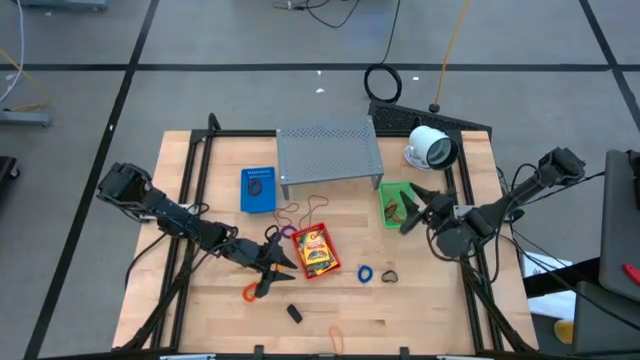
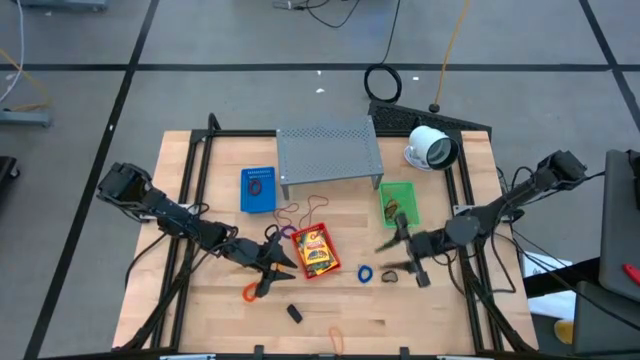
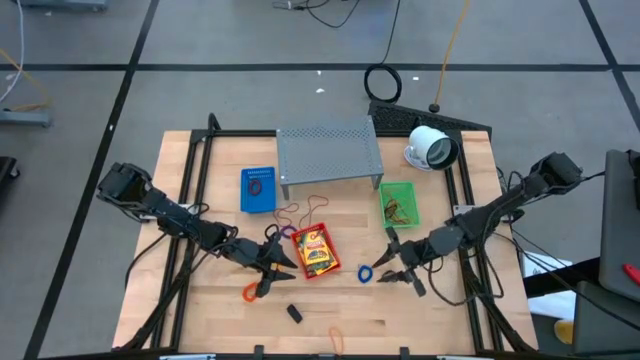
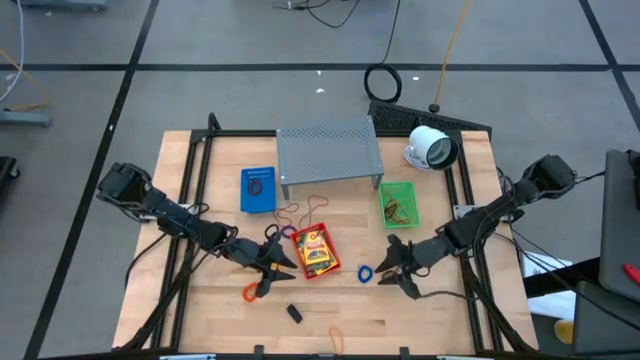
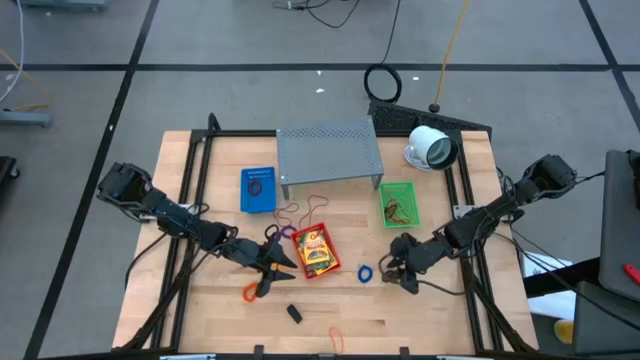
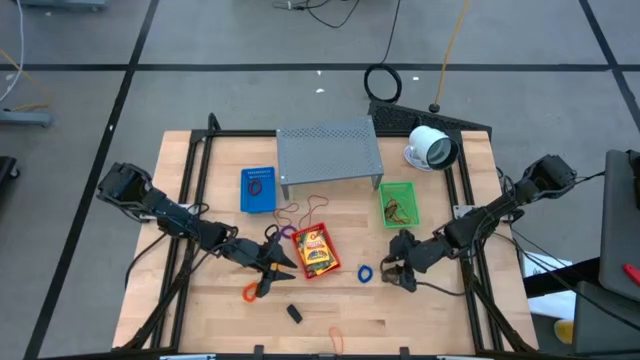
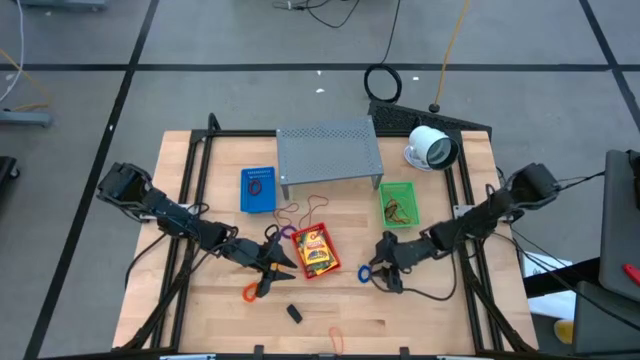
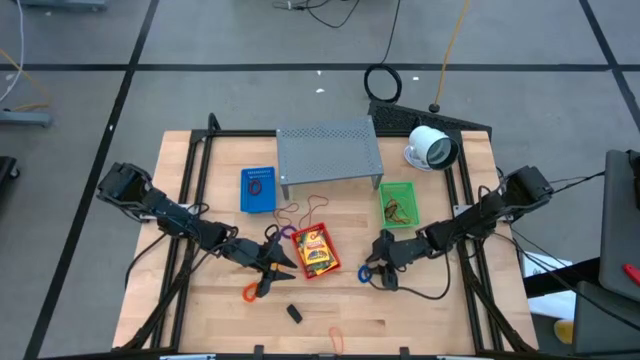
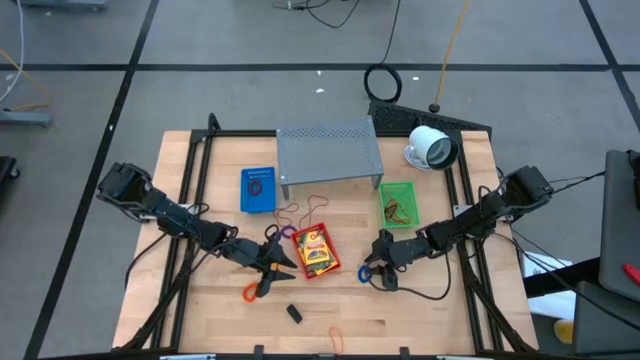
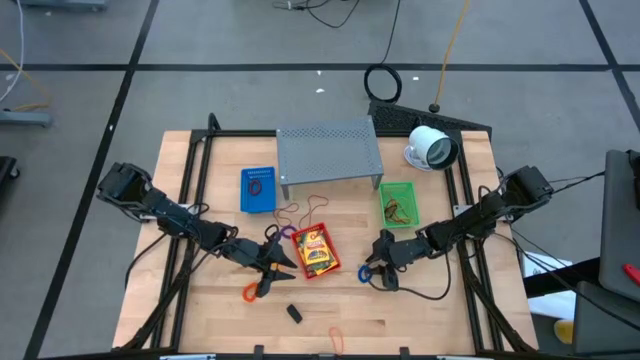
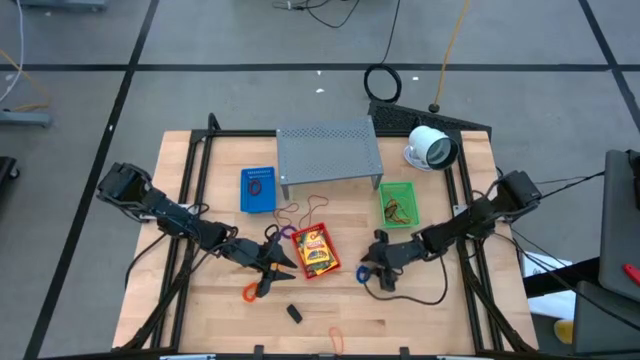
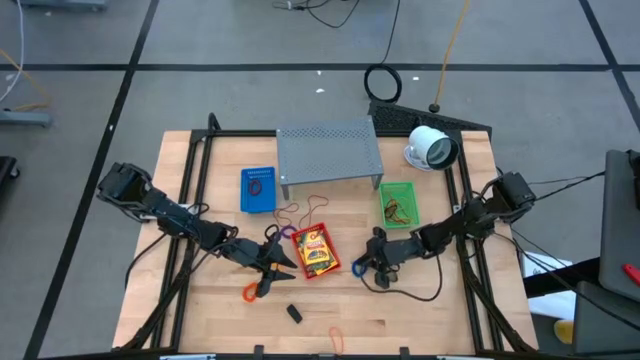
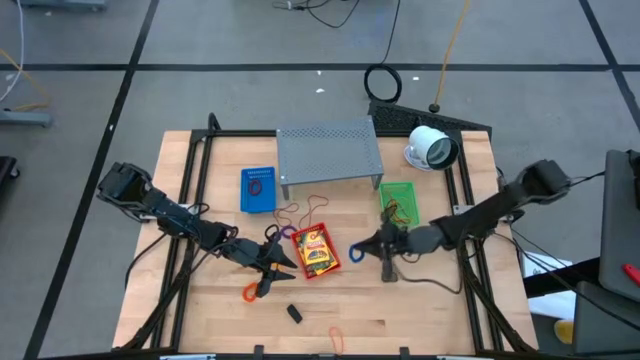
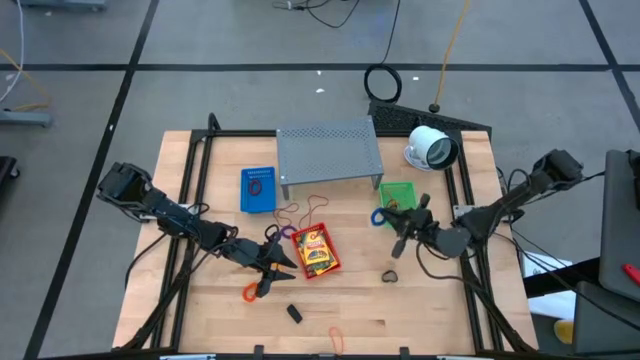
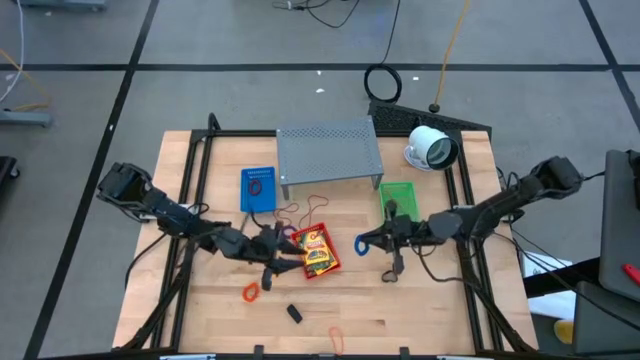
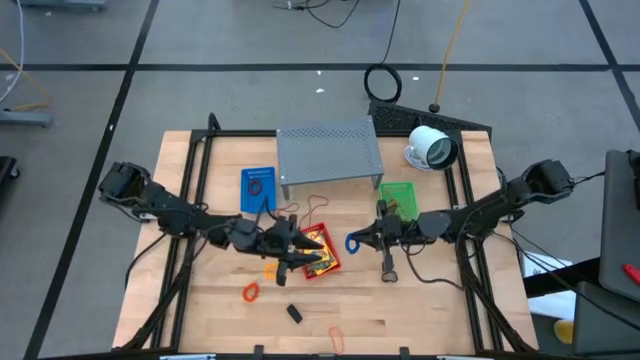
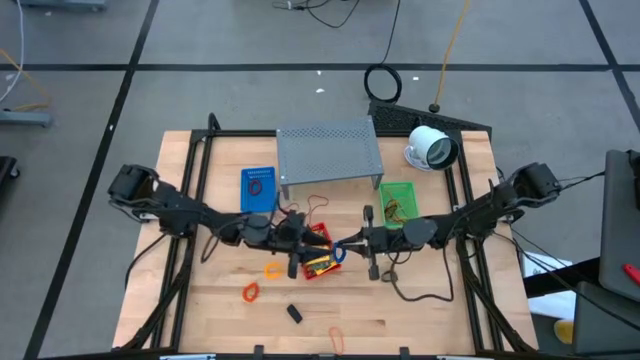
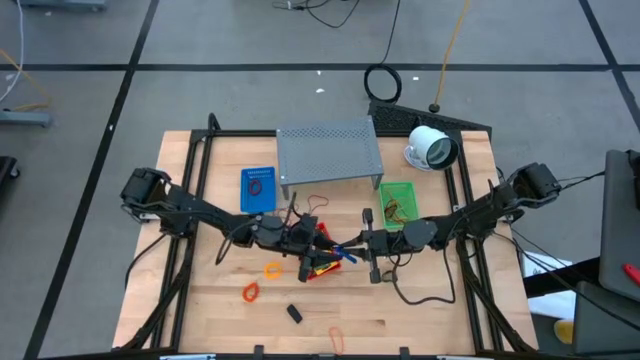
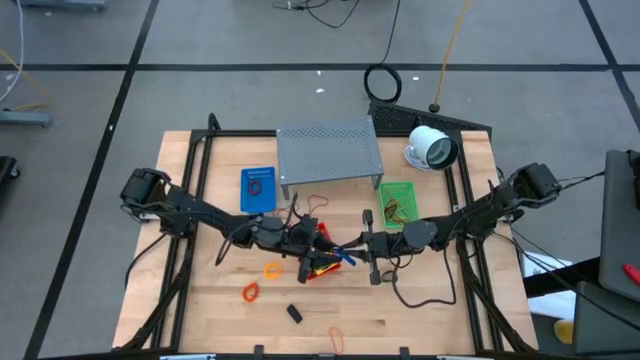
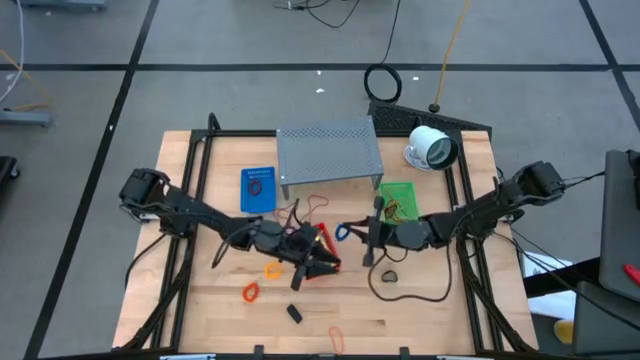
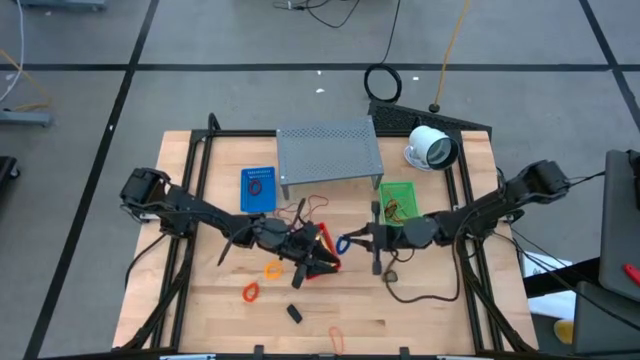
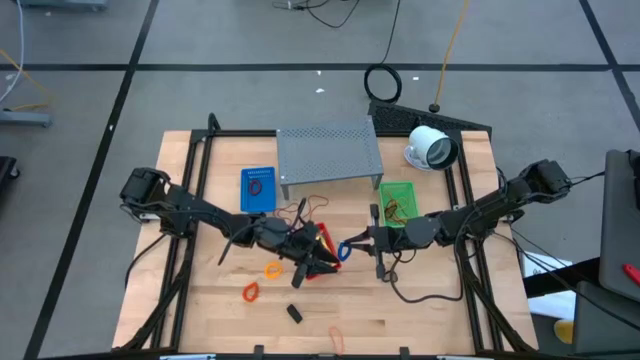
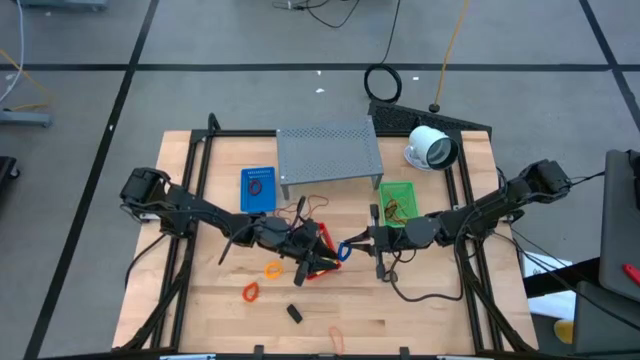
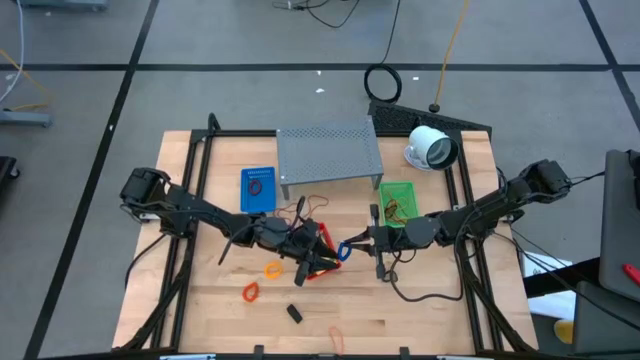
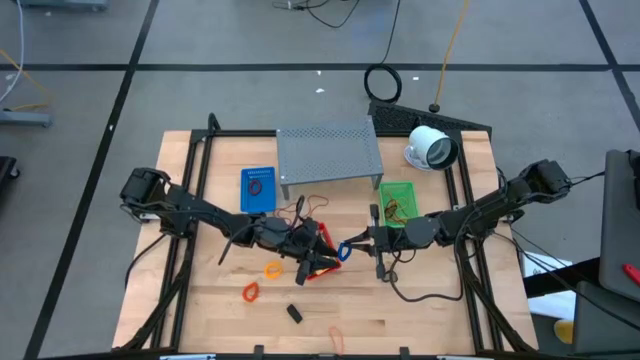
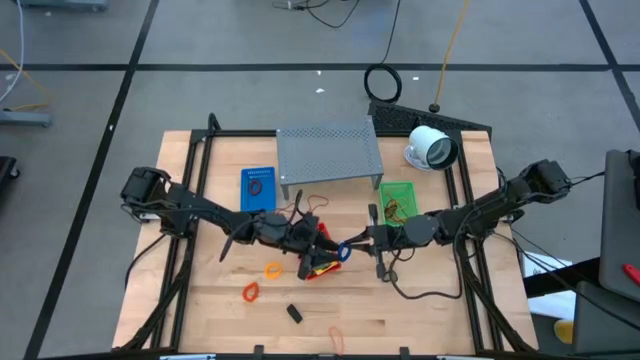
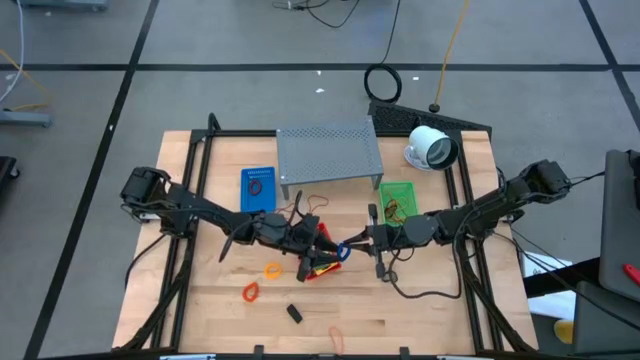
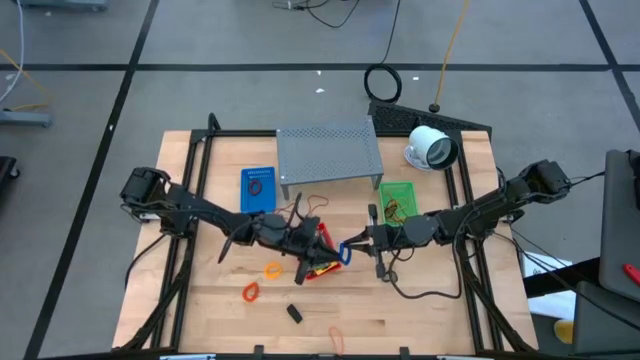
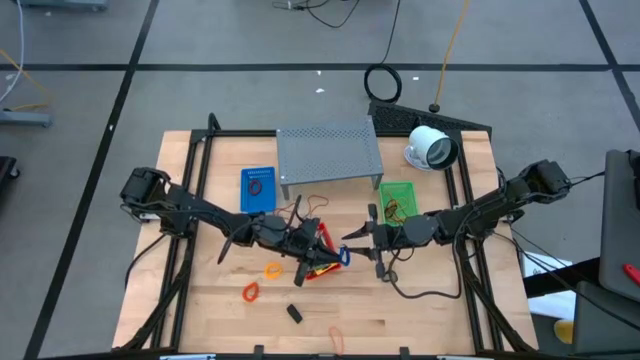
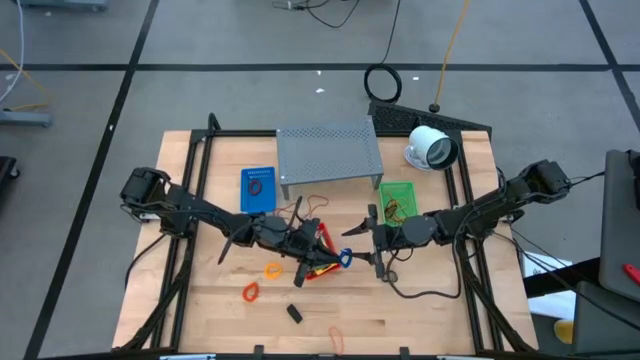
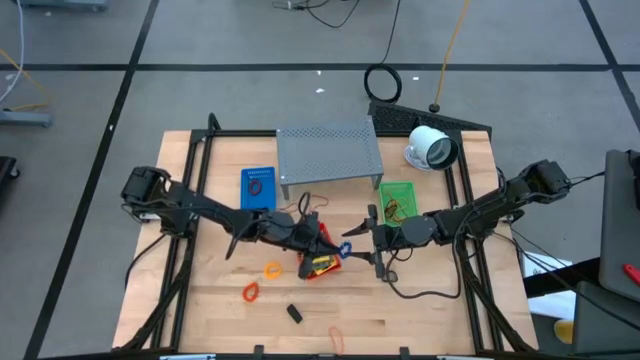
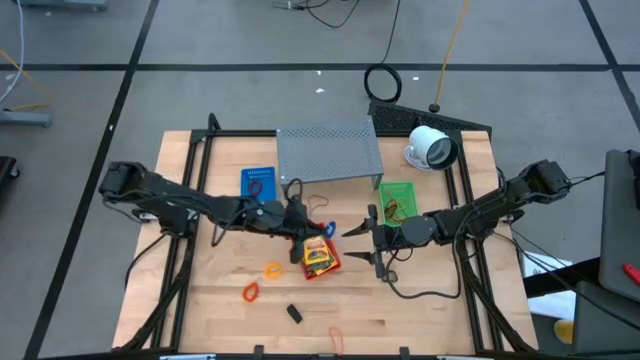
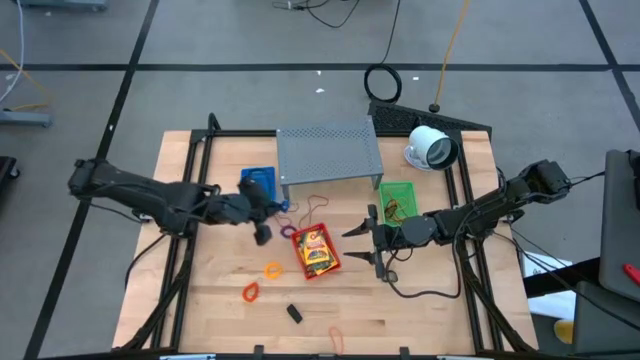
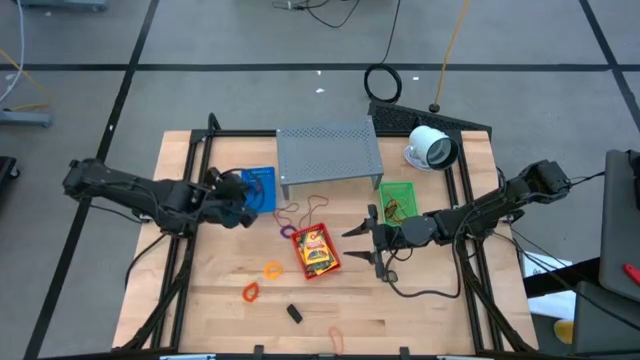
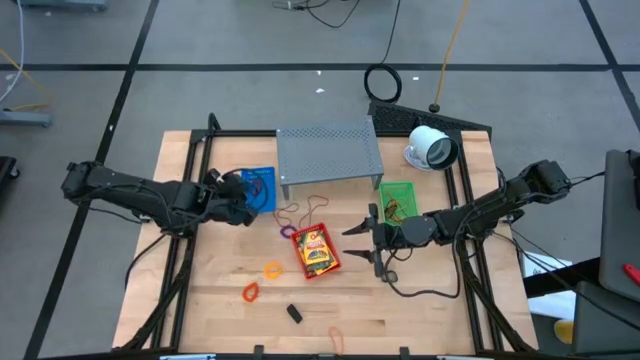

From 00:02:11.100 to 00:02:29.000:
Task: Pick & Place Office Desk Supplies
Put the blue spring keychain into the blue bin

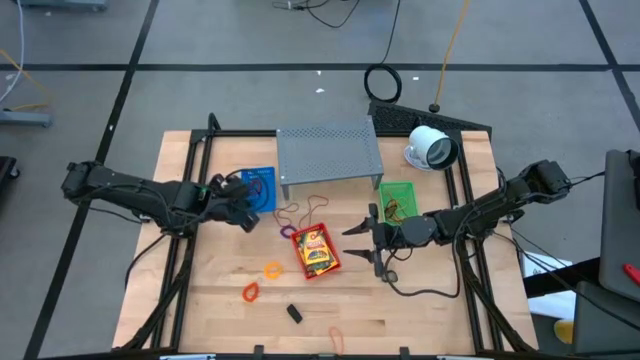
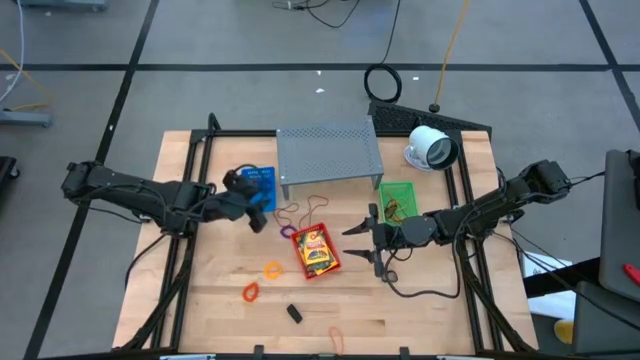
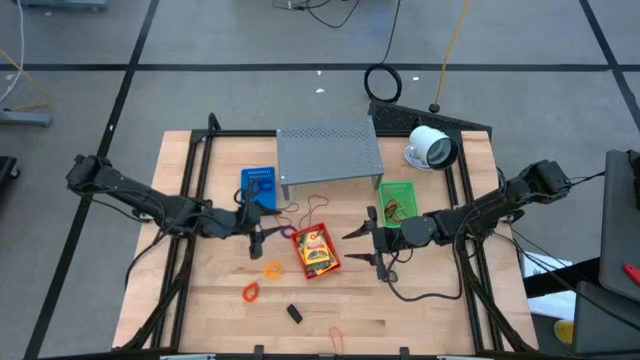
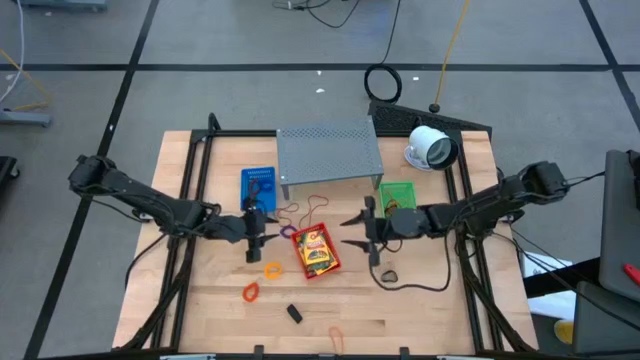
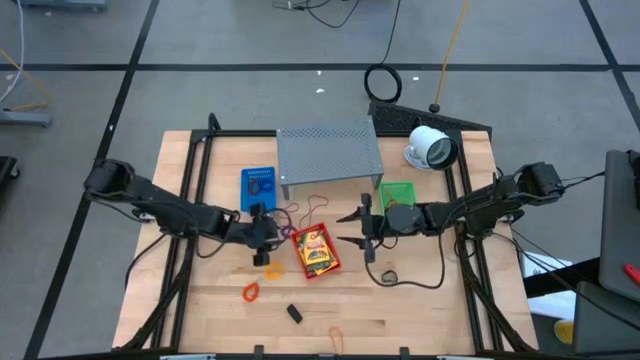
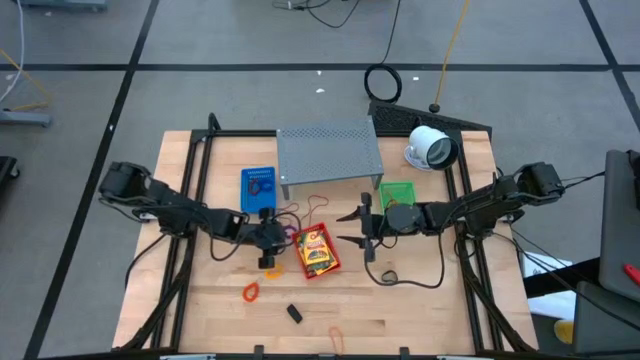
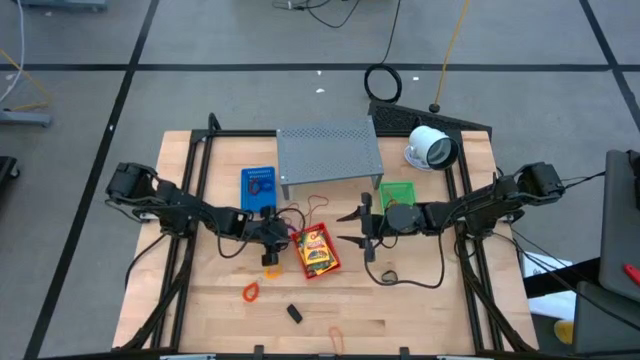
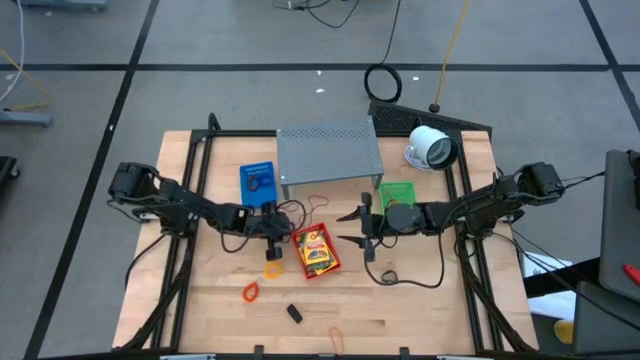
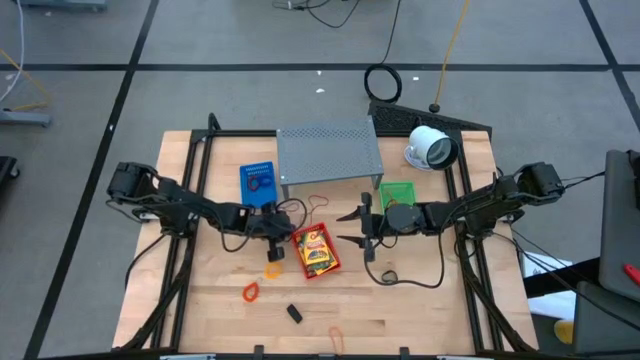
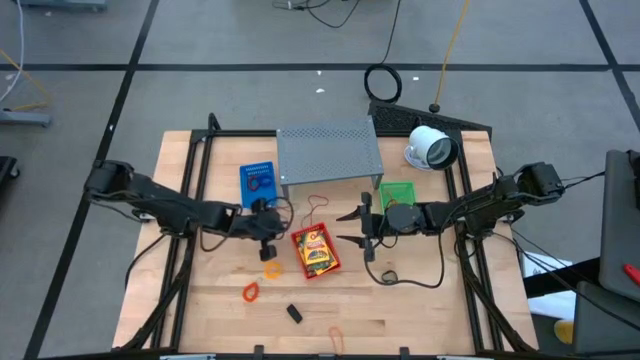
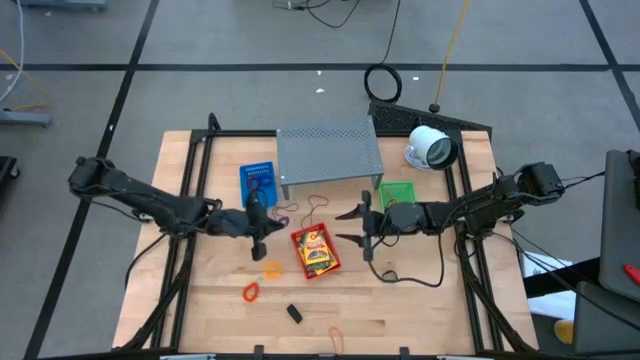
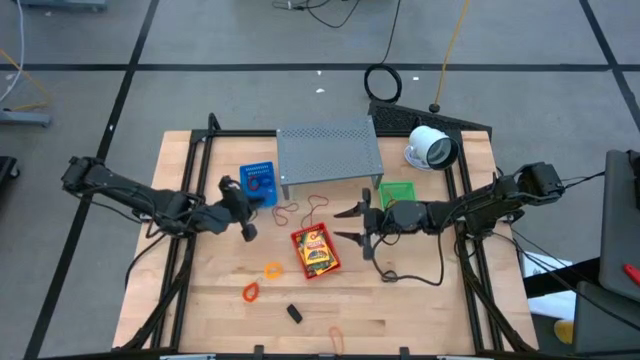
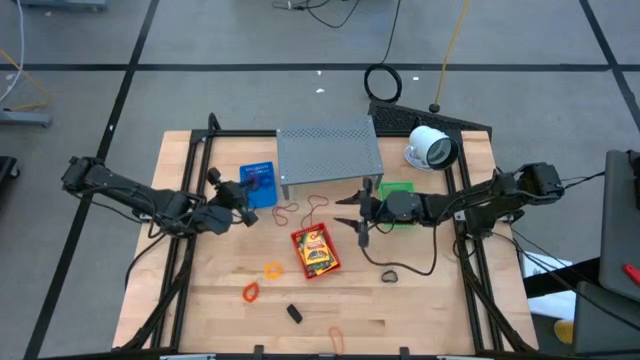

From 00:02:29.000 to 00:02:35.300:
Put the purple spring keychain into the blue bin
